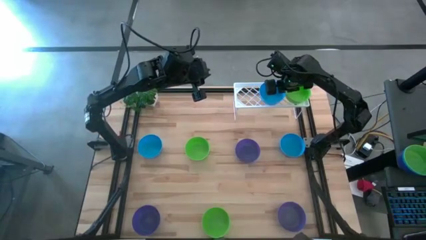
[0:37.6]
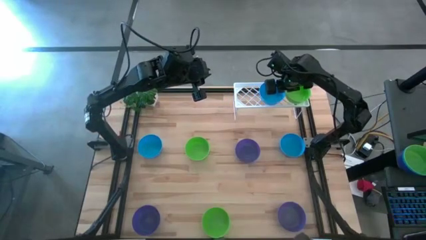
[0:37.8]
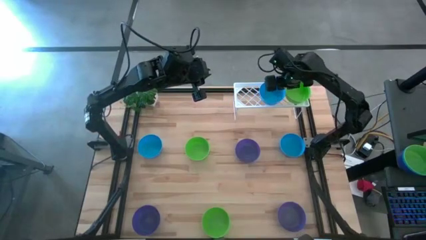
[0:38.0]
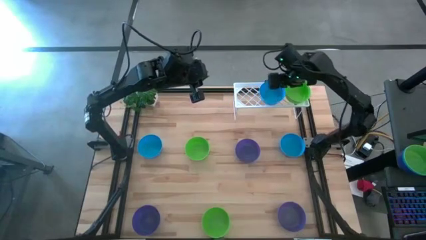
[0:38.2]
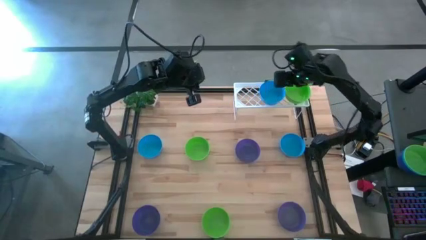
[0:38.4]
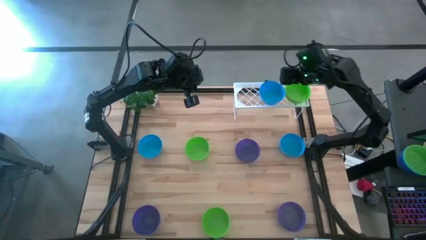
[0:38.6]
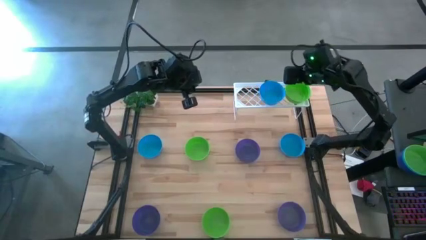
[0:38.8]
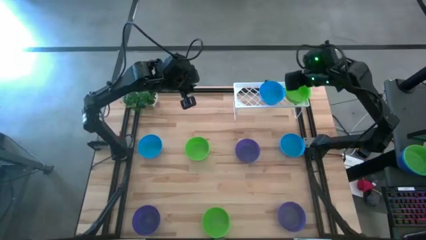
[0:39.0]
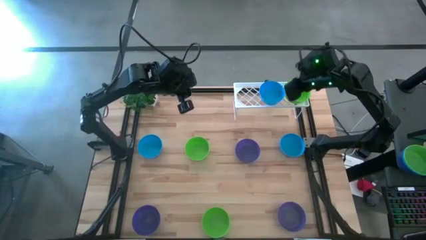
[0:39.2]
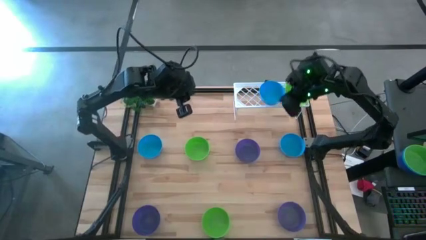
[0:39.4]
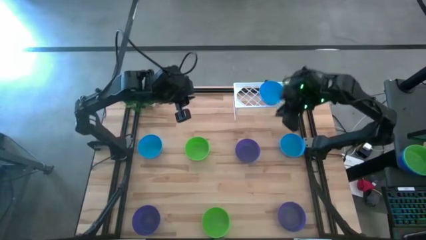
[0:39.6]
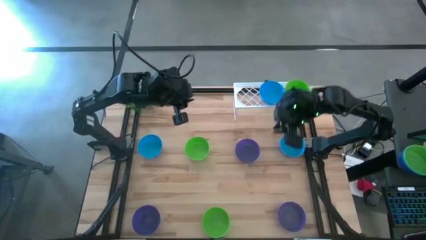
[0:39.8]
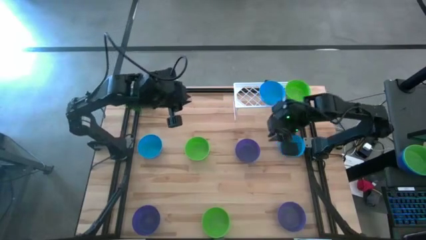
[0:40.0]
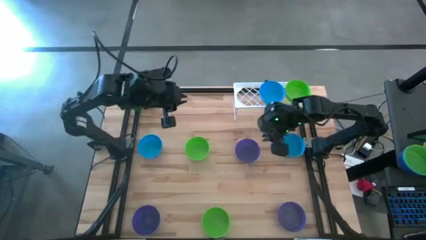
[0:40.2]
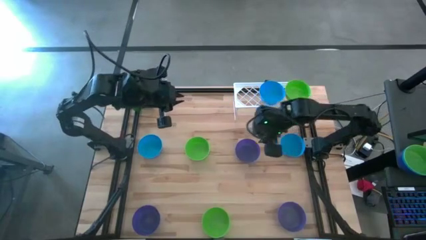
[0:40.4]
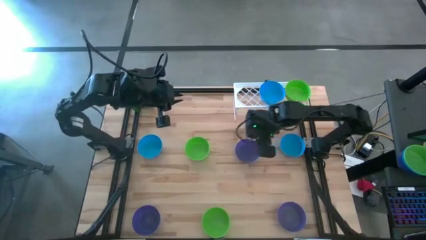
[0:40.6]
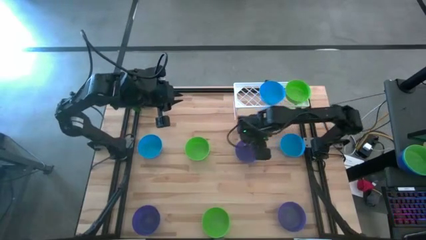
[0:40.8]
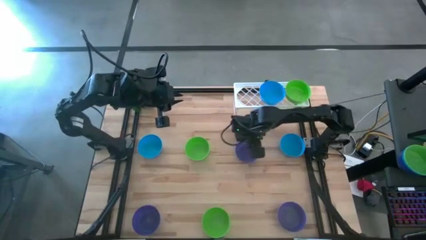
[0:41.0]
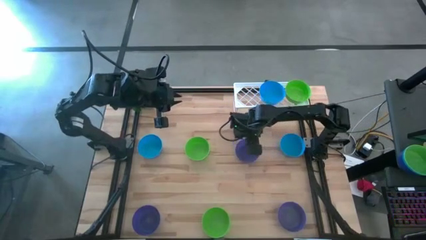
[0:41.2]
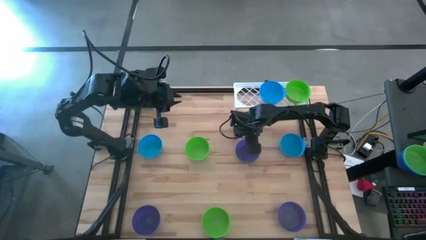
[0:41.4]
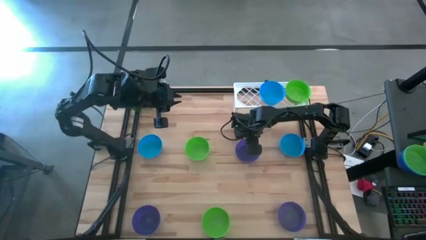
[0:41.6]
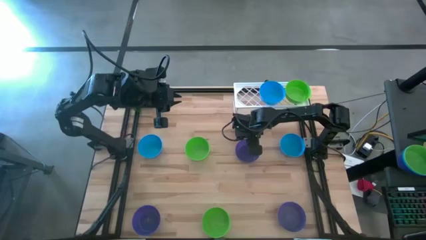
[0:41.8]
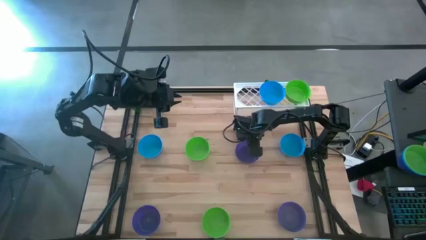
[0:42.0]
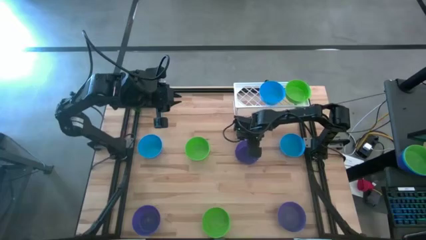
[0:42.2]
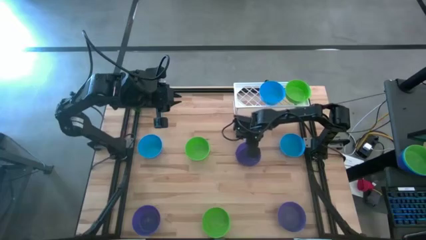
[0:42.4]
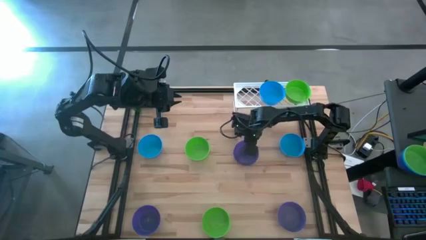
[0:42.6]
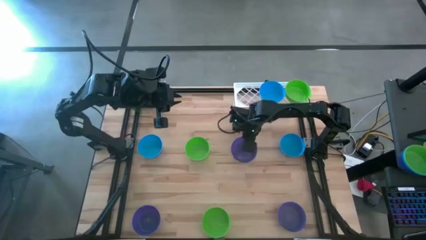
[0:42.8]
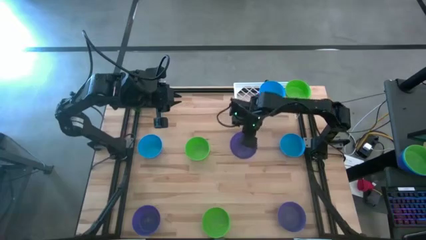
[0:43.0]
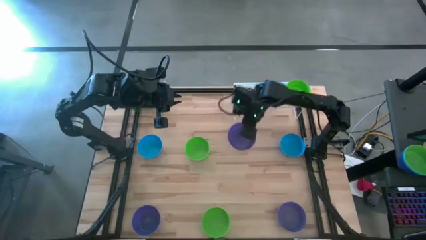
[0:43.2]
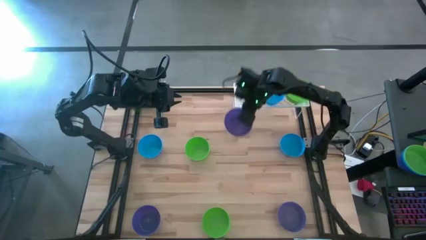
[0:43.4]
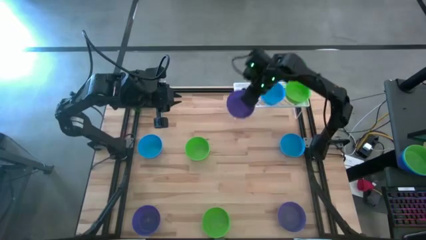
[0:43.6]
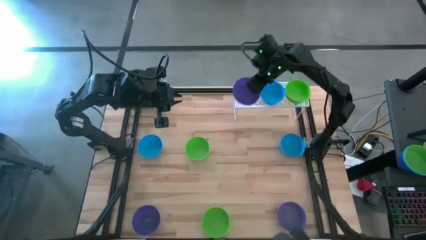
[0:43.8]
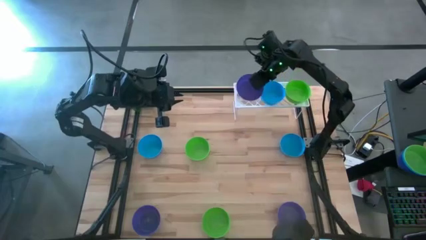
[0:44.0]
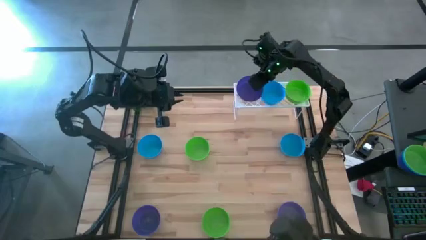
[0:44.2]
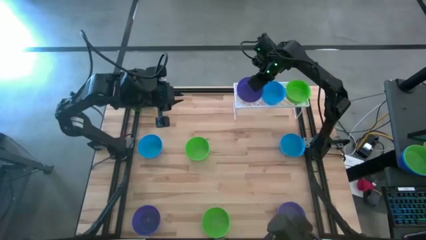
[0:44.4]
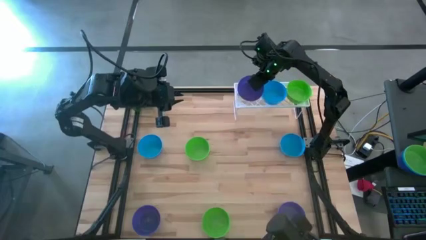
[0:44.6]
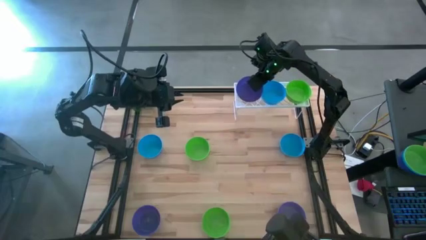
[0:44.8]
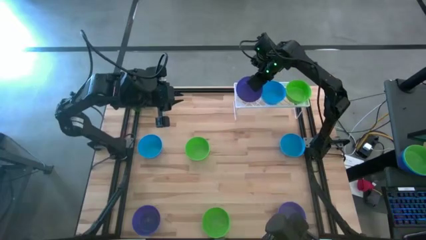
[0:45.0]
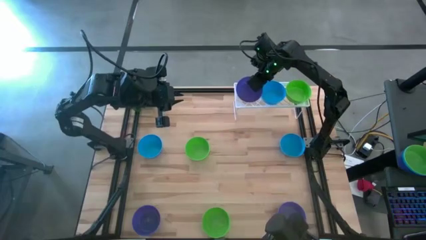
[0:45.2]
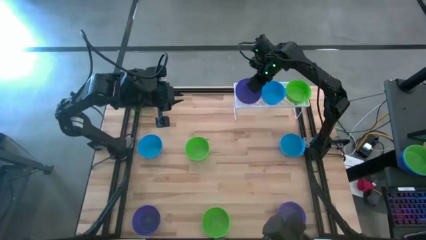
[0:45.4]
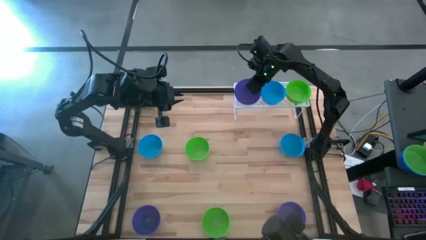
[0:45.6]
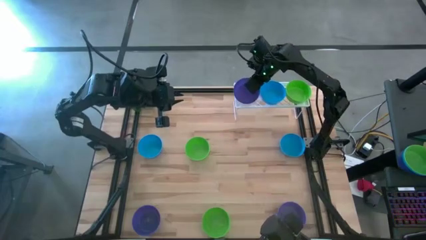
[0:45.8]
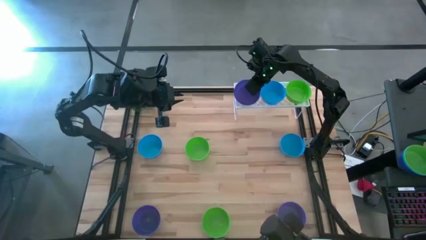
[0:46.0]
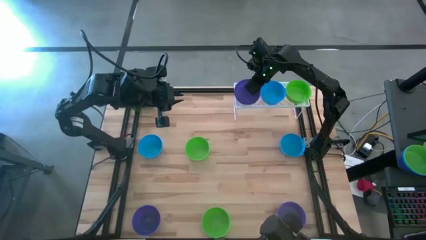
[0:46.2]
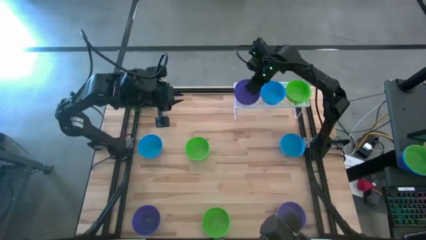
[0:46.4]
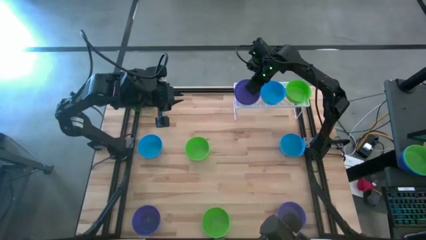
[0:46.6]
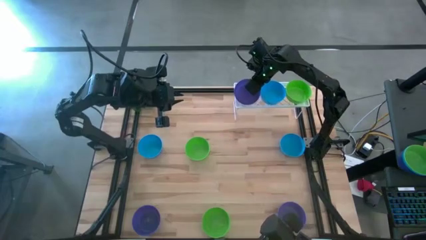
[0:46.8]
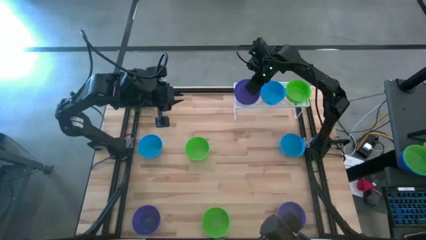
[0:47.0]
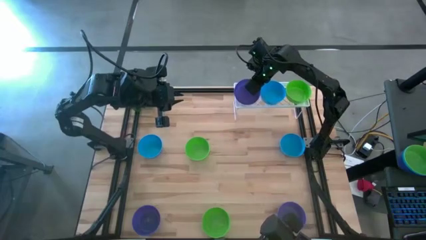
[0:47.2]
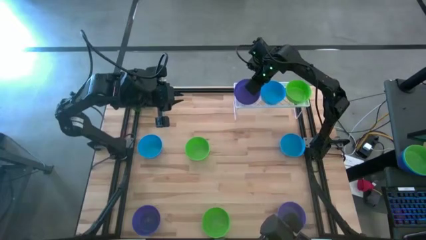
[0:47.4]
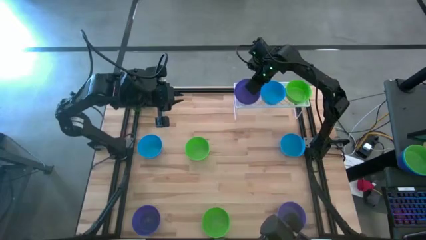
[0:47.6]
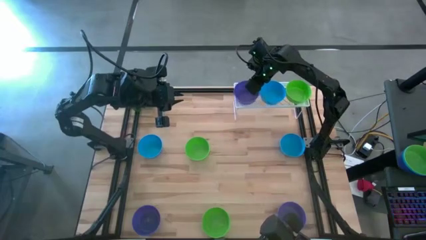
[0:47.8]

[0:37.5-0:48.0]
Task: Pick & Place Mini bowls
Put the top violet bowl on the shelf
